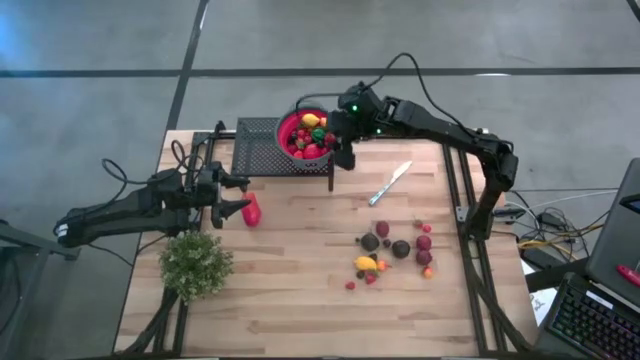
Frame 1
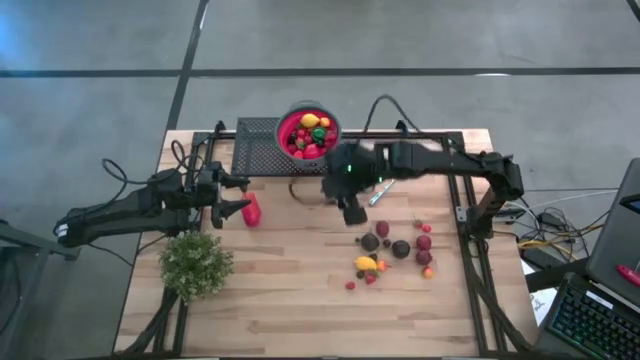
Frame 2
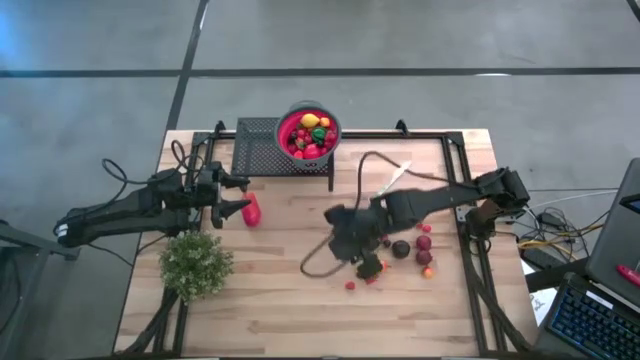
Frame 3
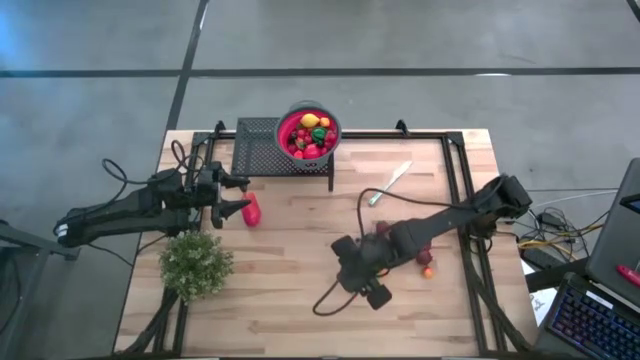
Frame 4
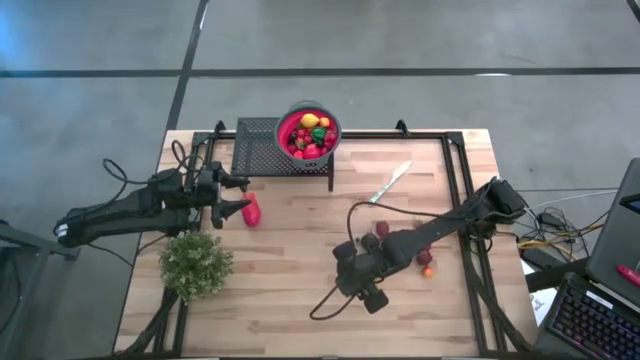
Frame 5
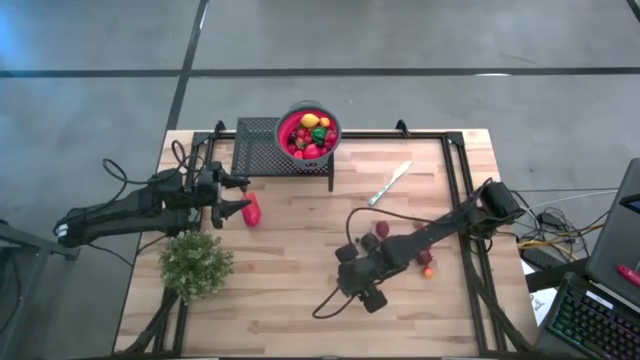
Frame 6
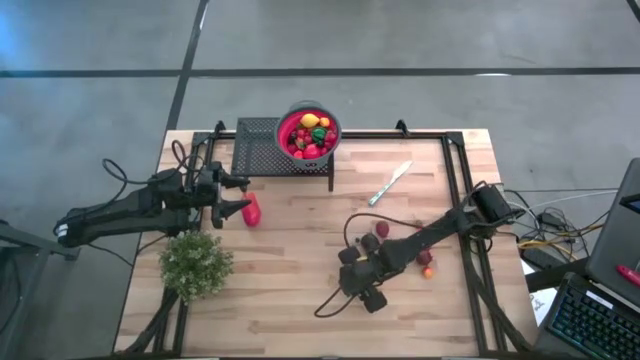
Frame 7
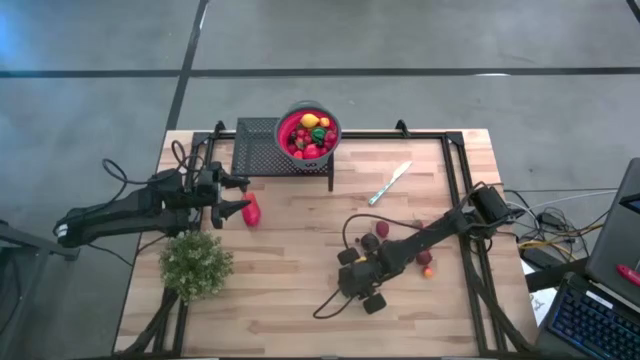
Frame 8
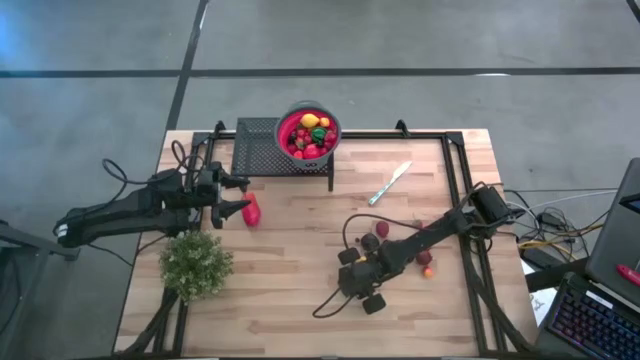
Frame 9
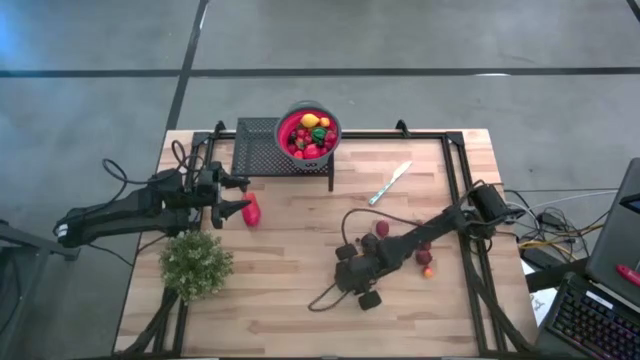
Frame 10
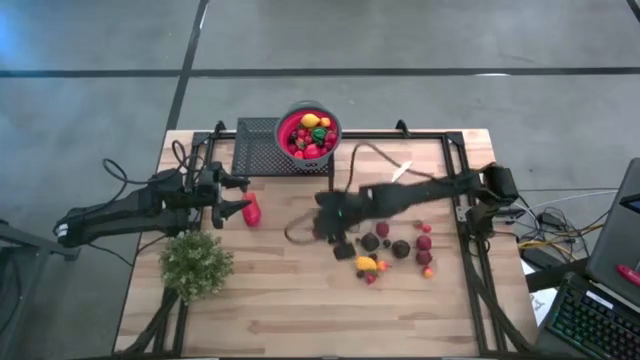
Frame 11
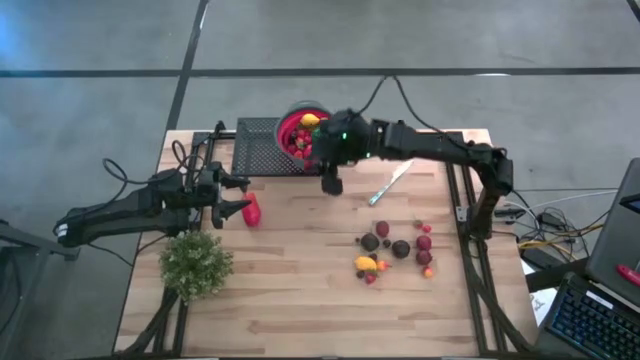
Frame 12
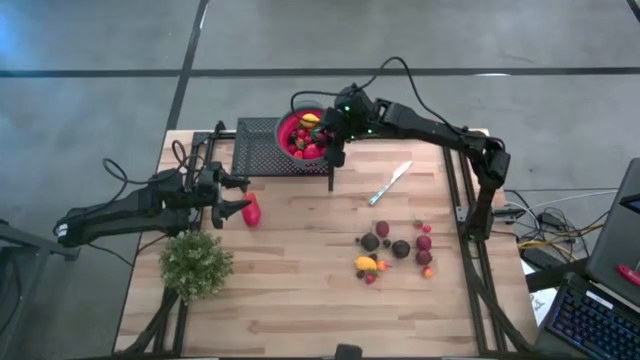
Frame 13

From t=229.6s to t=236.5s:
Task: Pick & Place Fruit
Put the red raspberry into the red gray strainer bowl on the shelf

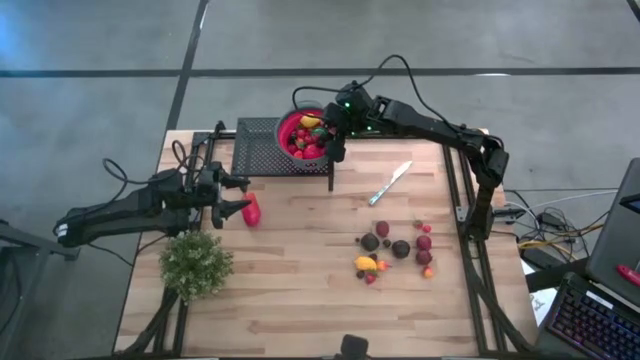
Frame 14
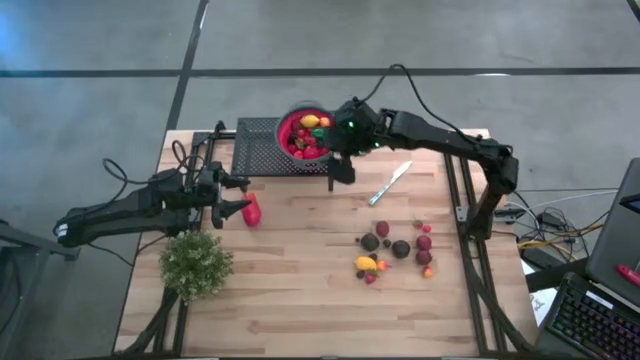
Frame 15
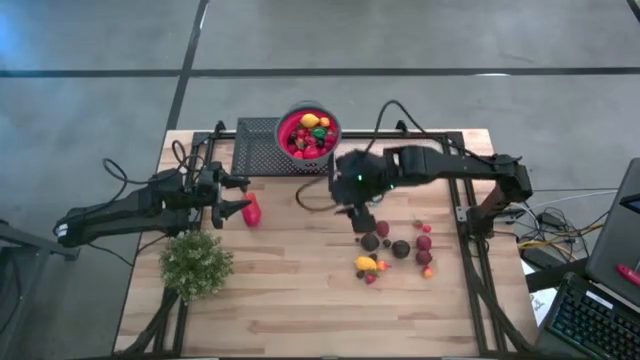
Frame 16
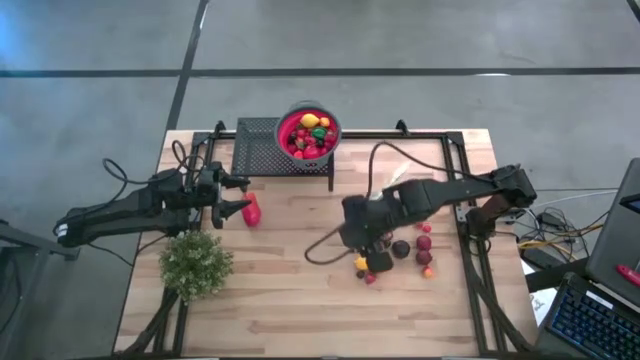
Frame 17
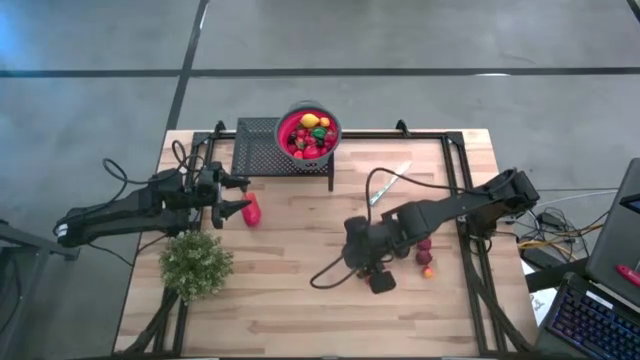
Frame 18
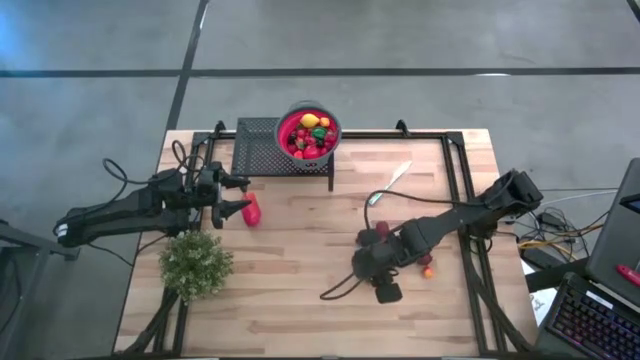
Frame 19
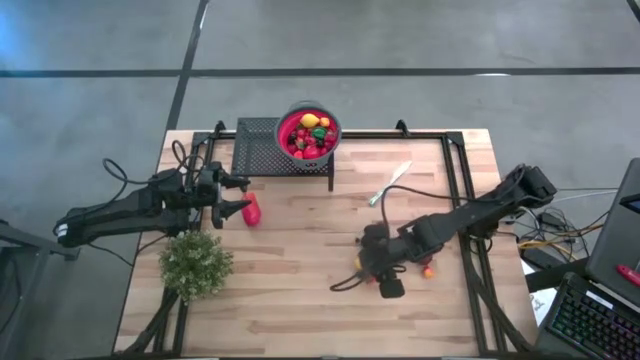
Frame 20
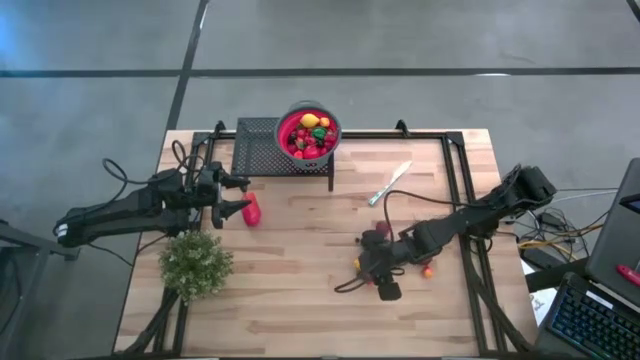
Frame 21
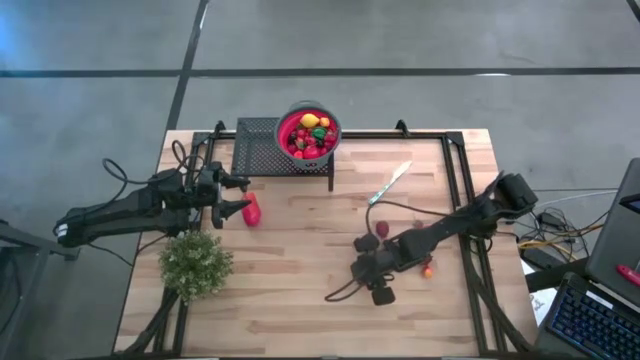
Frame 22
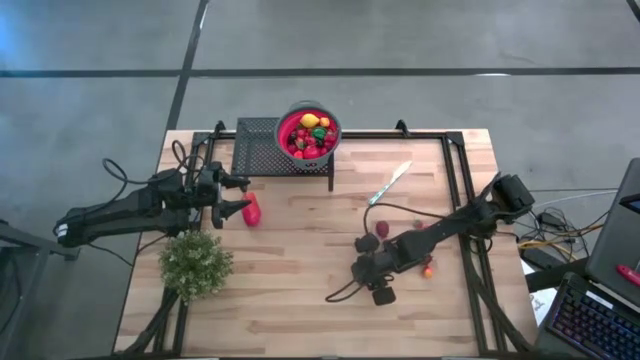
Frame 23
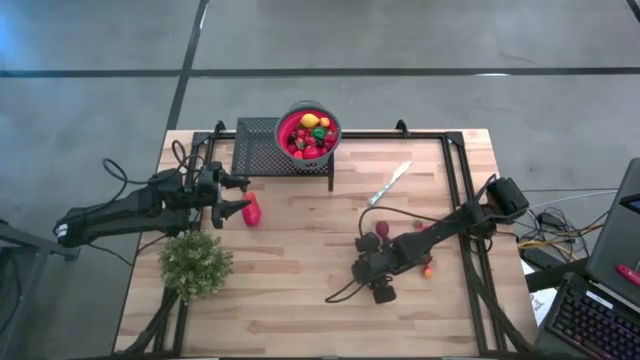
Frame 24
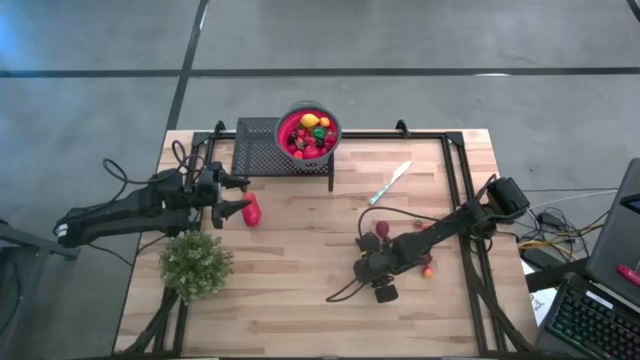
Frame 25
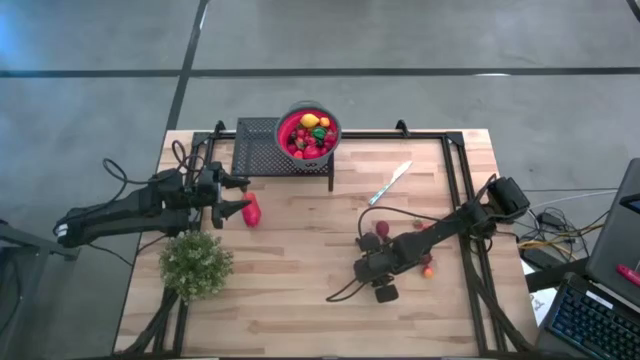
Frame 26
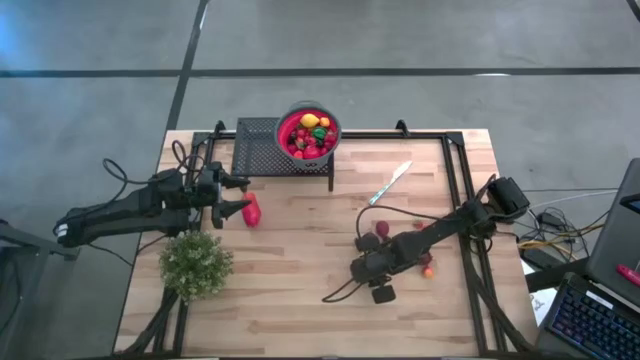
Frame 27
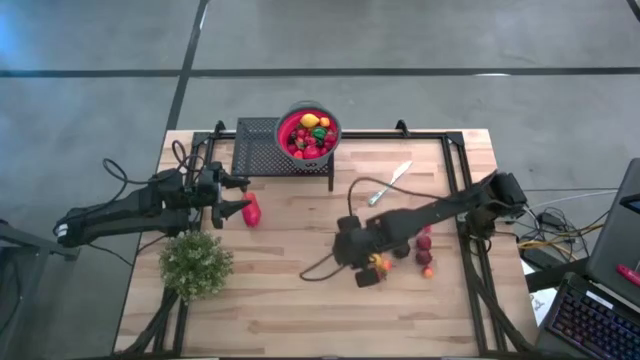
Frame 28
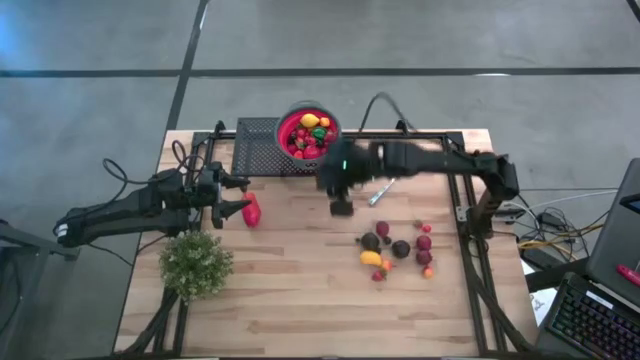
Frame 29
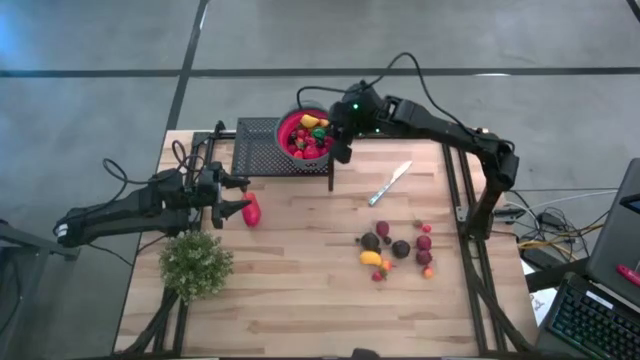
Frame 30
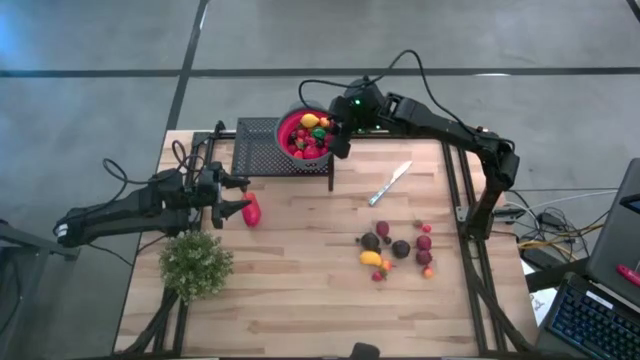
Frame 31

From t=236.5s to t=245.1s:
Put the red raspberry into the red gray strainer bowl on the shelf

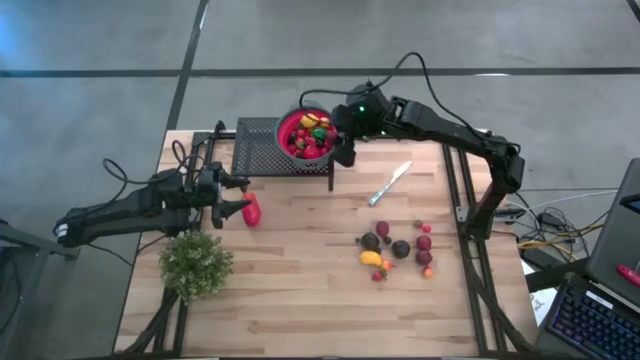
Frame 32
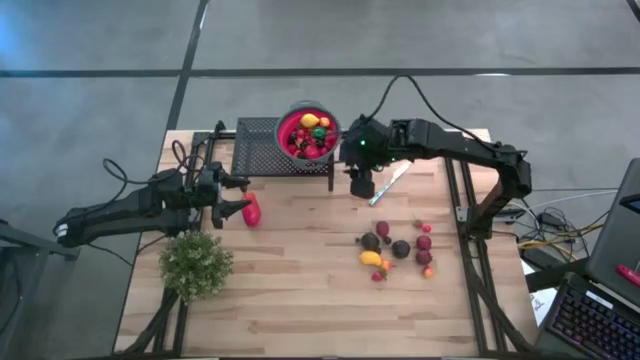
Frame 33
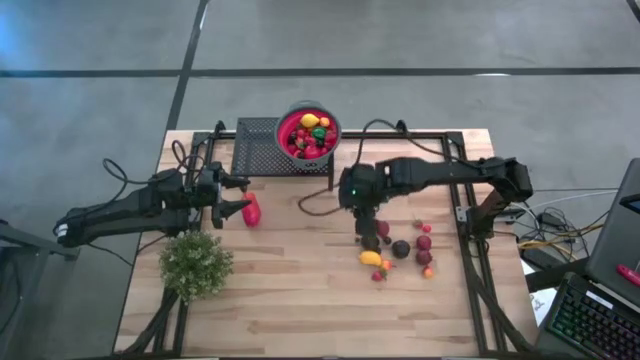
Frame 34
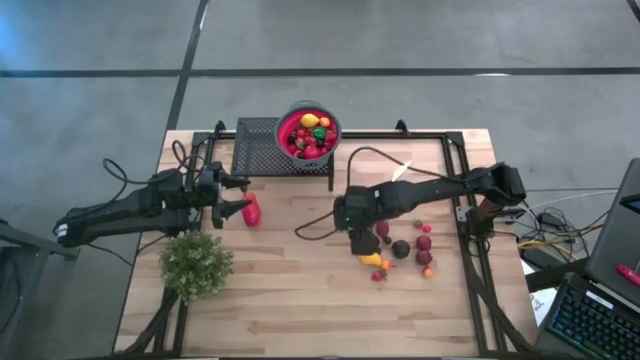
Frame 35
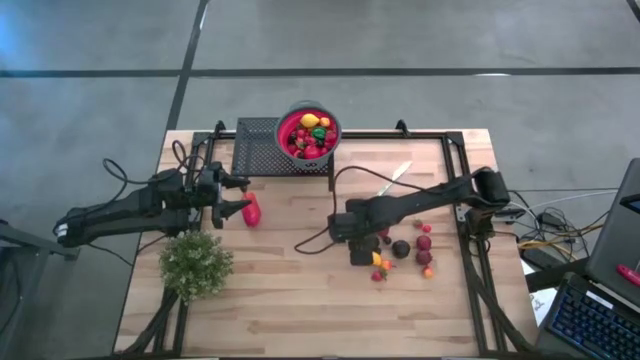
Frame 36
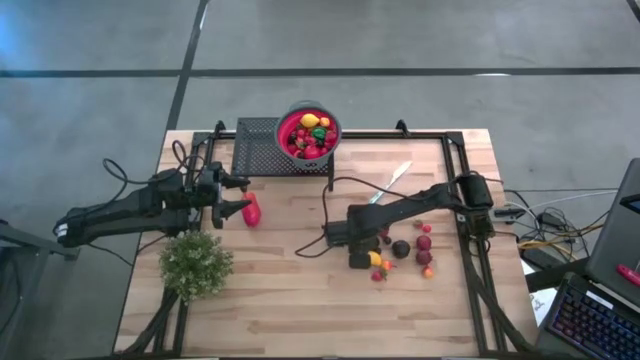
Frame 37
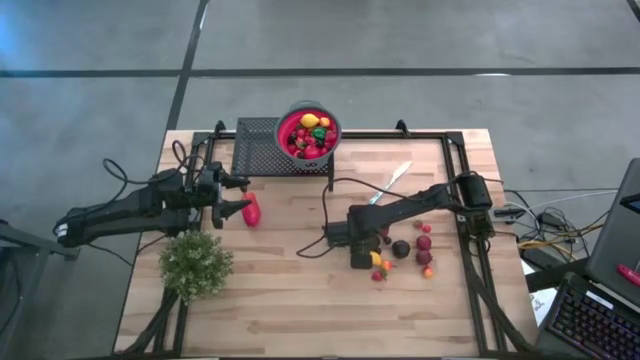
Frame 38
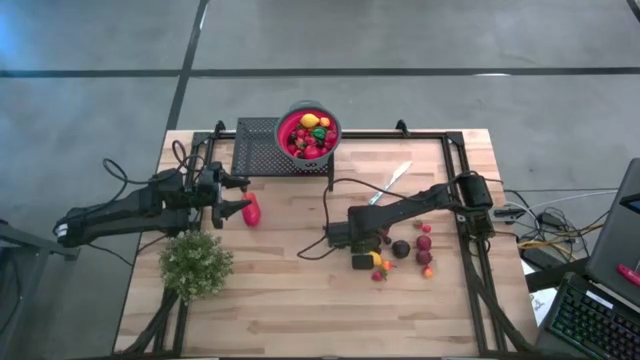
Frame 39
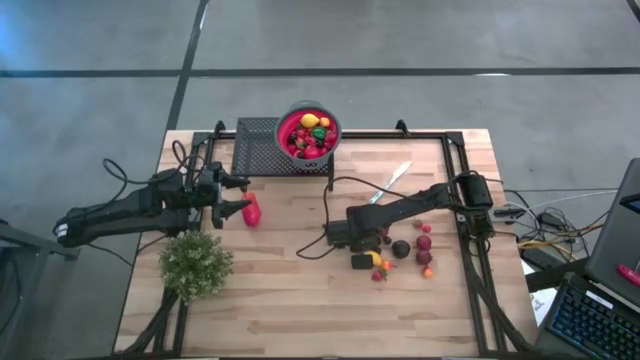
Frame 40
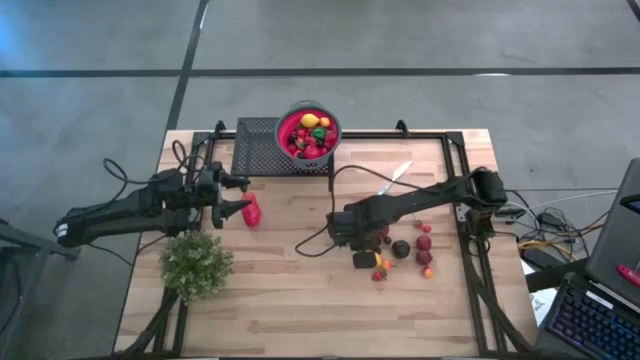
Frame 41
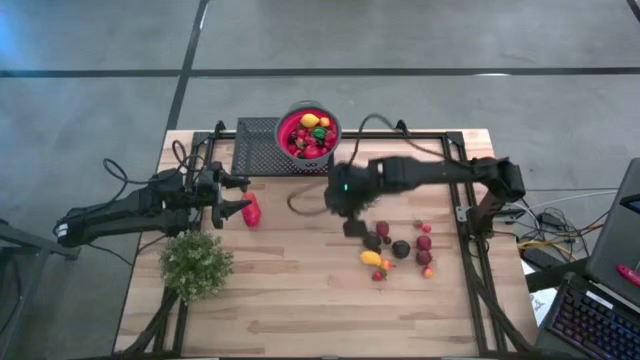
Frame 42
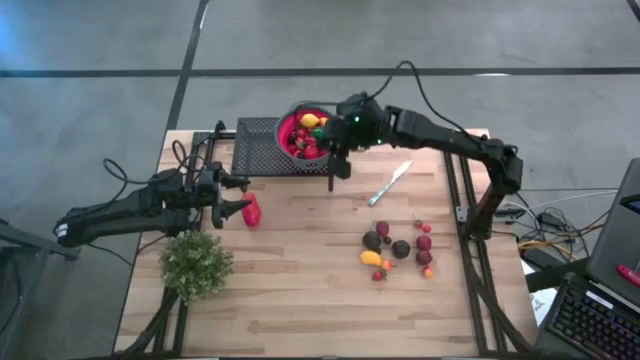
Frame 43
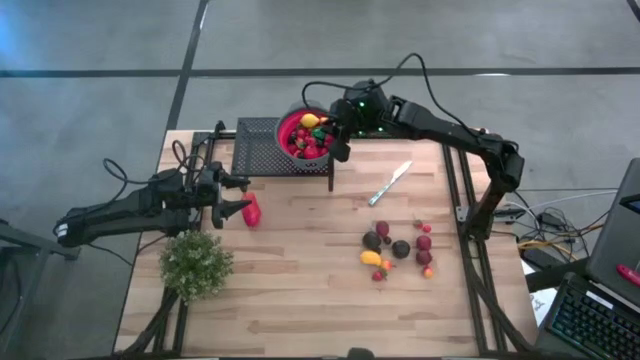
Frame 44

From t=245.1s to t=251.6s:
Put the blueberry into the red gray strainer bowl on the shelf
